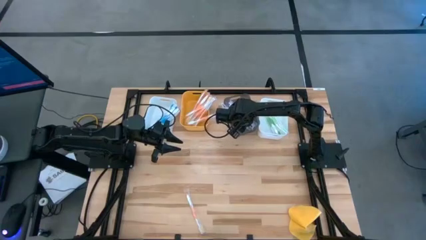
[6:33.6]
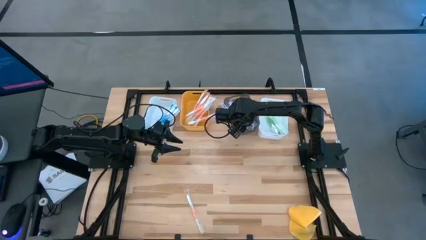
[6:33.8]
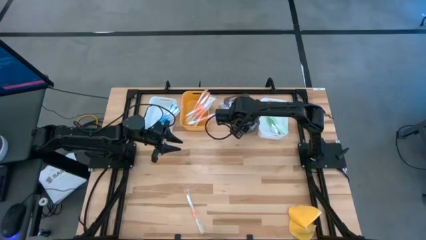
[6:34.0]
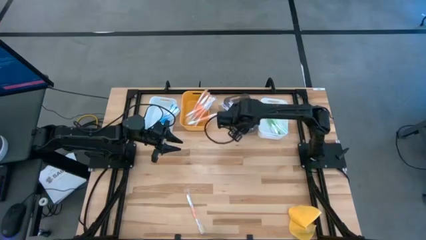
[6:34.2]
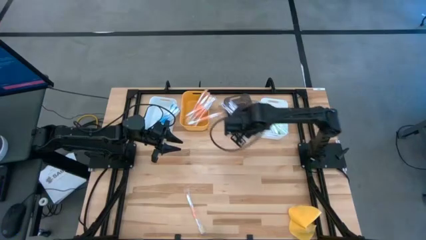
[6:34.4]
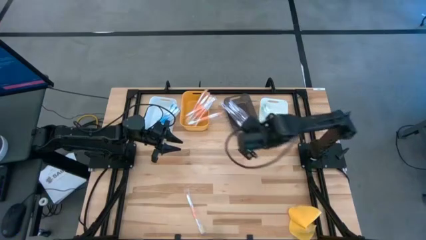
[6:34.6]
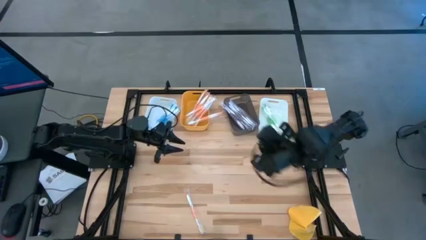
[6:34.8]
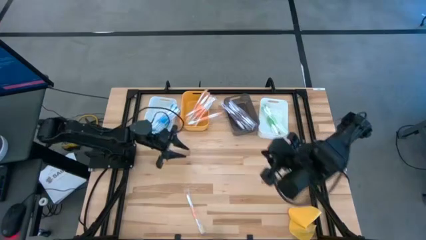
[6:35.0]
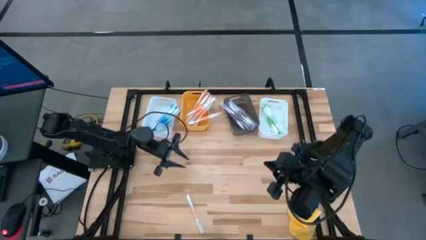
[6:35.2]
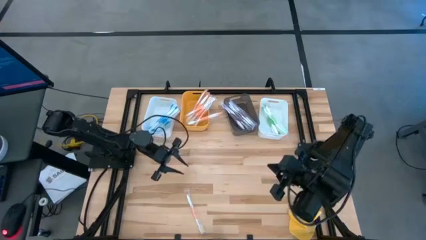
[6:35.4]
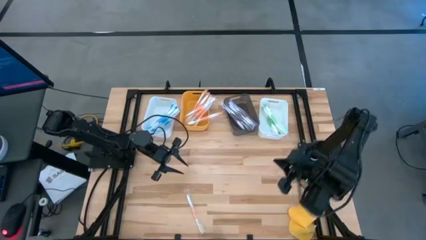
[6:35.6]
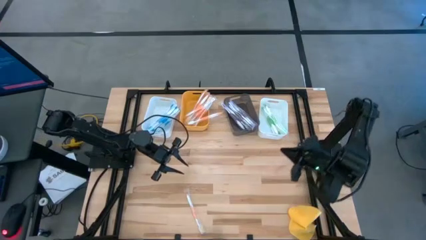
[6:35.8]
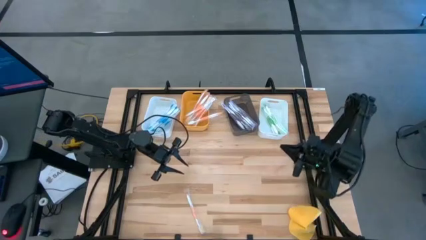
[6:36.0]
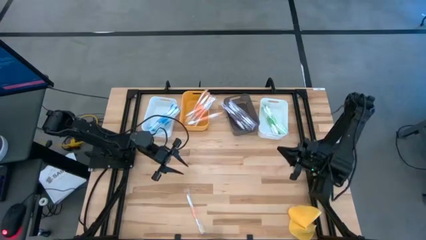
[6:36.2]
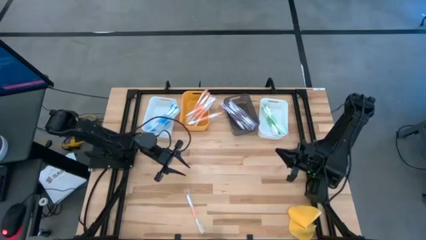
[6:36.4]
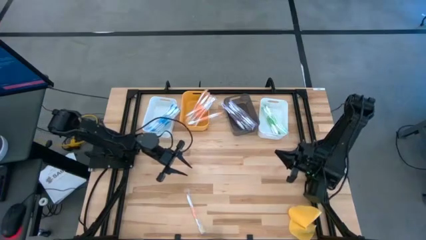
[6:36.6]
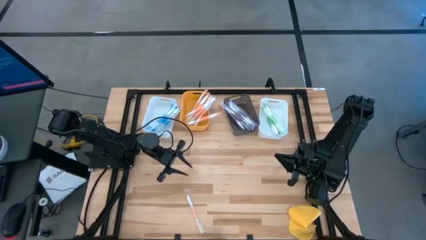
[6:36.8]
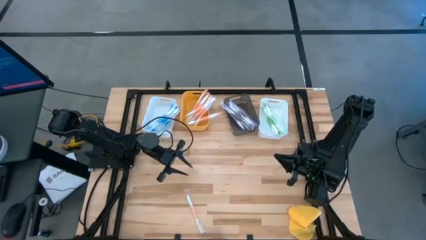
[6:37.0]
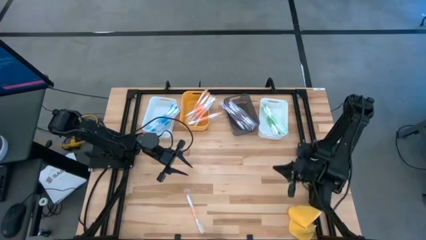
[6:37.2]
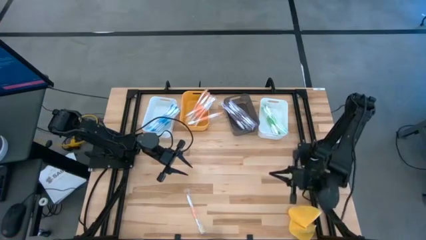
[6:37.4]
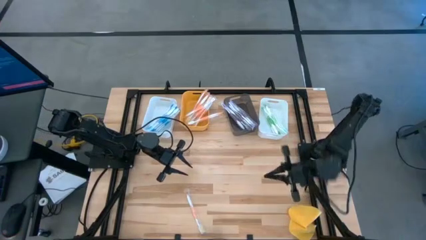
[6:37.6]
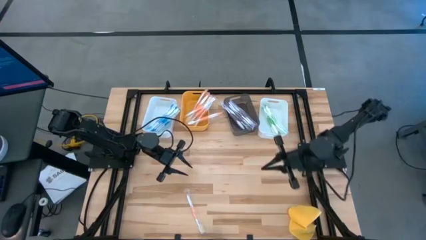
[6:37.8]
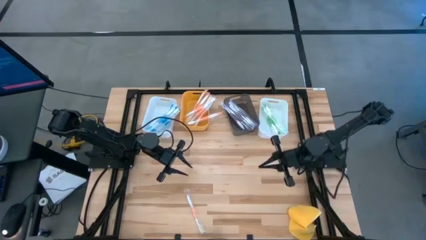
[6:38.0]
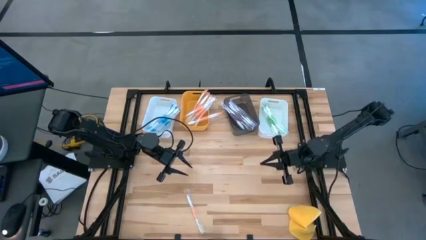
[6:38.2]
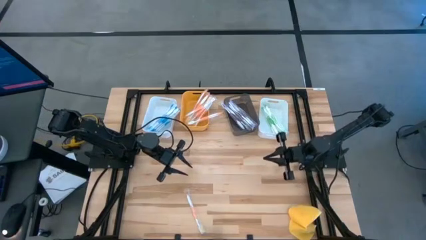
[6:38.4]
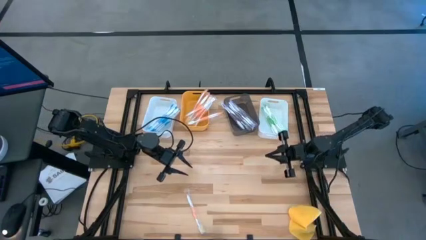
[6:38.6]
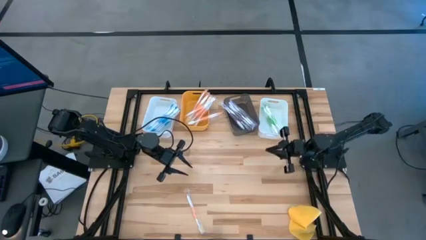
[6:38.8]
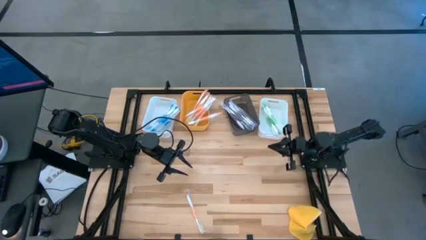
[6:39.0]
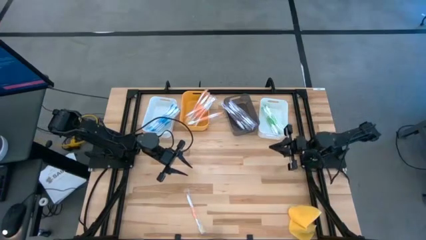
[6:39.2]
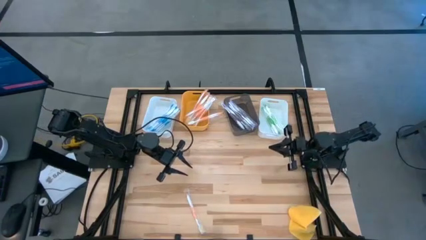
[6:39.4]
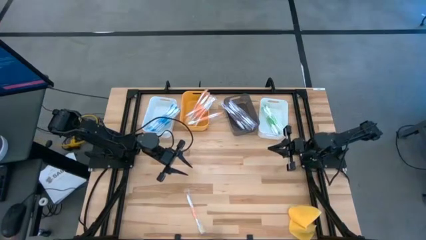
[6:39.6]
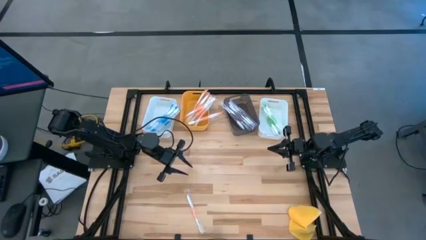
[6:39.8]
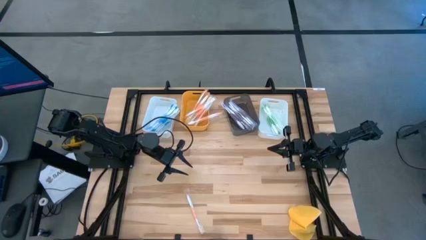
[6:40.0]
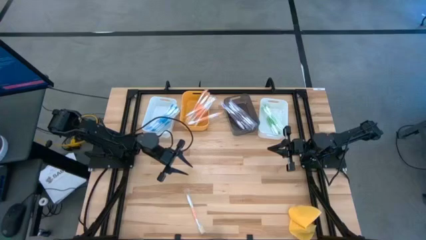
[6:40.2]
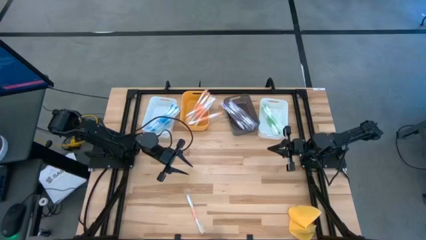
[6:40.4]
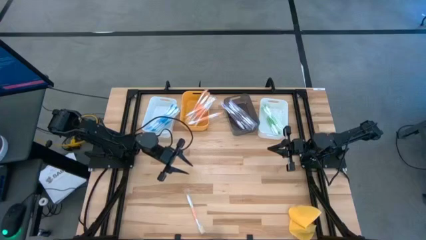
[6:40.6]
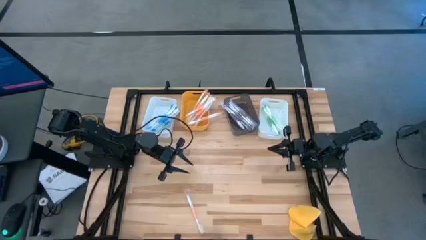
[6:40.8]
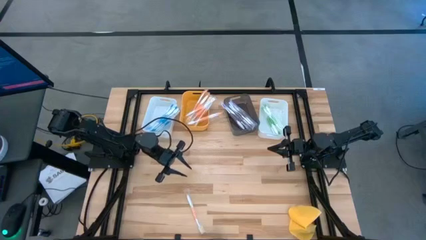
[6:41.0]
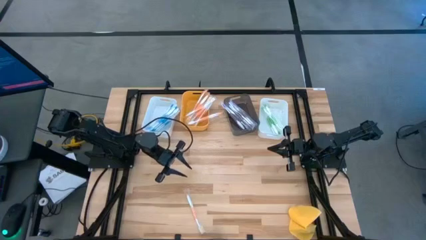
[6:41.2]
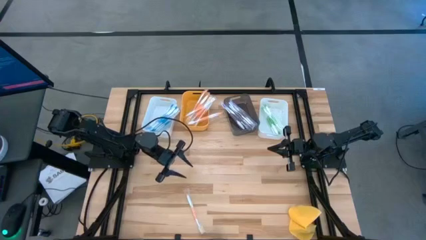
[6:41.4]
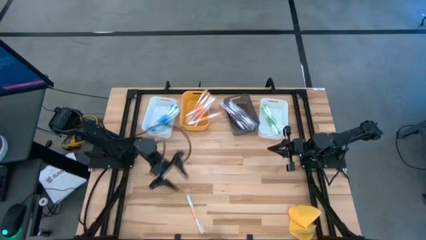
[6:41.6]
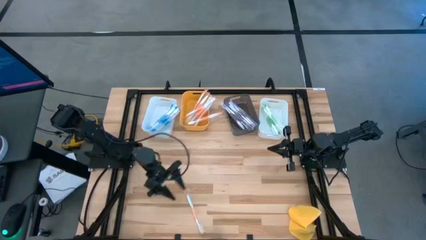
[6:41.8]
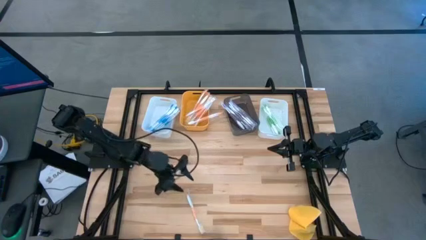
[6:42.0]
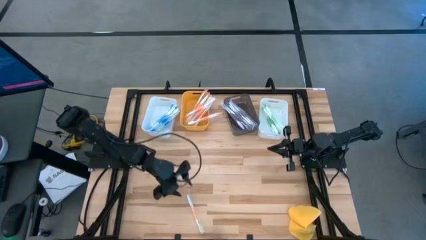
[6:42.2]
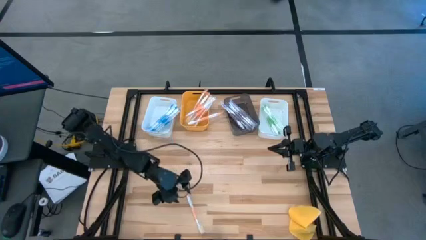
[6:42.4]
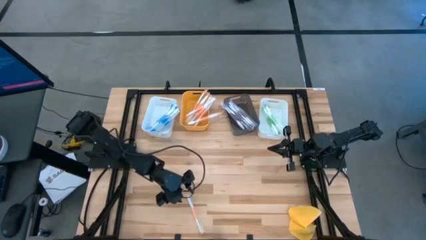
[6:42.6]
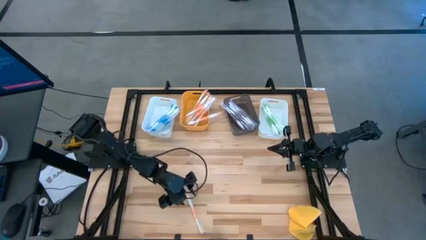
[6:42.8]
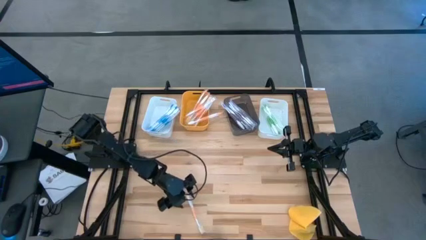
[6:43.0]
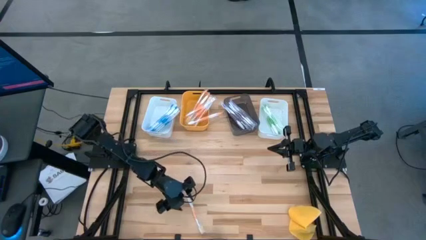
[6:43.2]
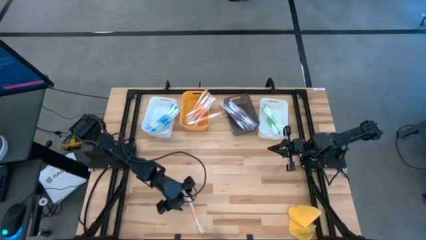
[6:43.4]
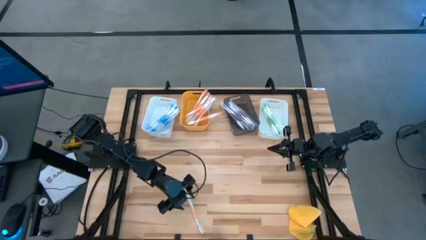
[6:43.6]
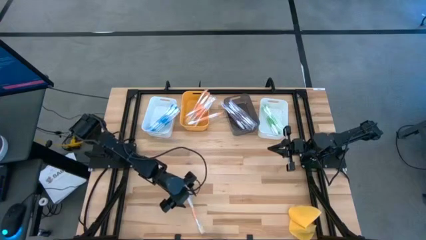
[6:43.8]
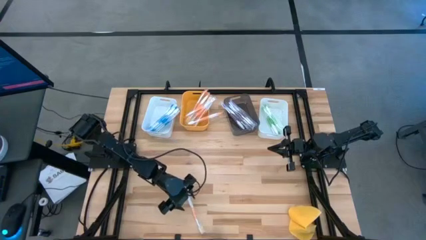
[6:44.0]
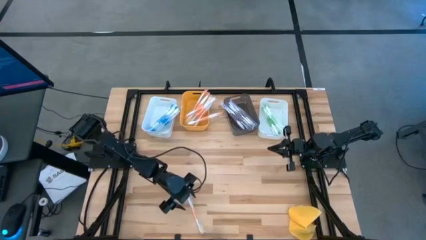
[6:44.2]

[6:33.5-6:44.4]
Task: Pick & Place Toothbrushes
Put the orange toothbrush into the yellow bin

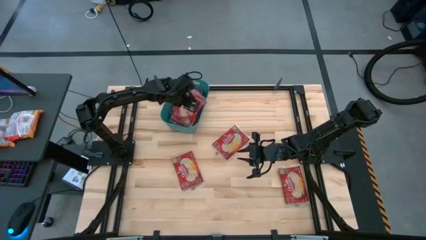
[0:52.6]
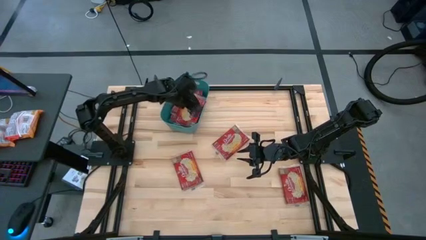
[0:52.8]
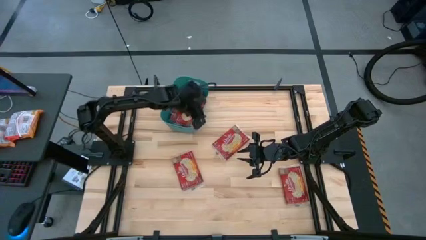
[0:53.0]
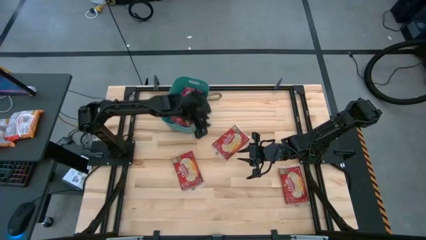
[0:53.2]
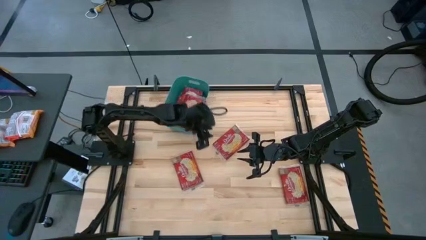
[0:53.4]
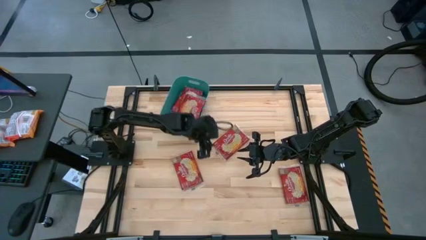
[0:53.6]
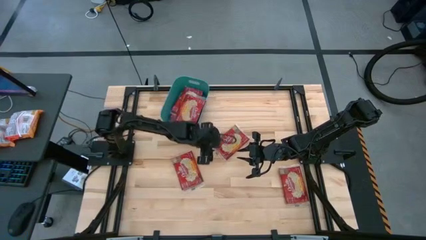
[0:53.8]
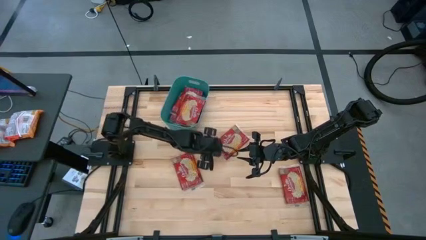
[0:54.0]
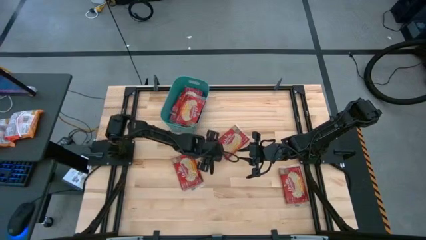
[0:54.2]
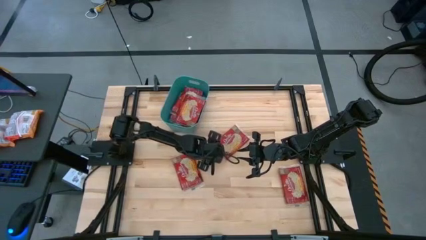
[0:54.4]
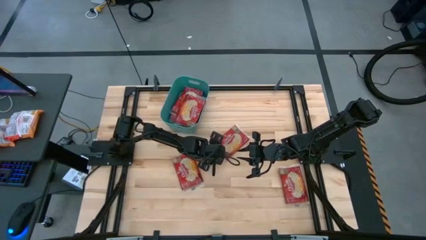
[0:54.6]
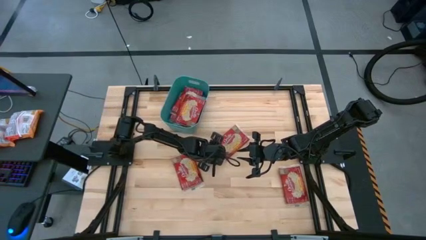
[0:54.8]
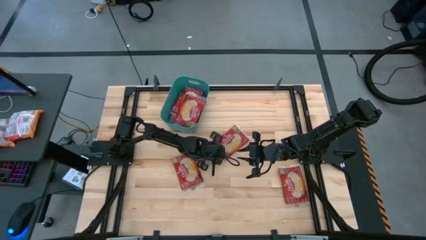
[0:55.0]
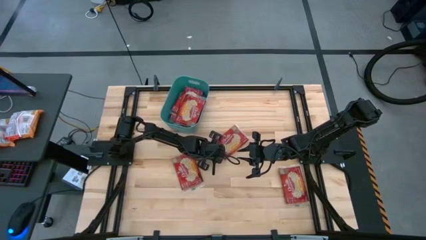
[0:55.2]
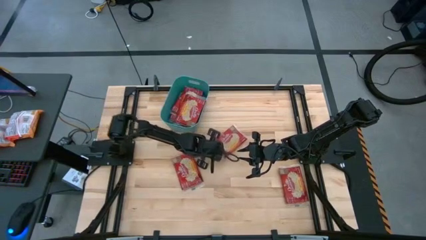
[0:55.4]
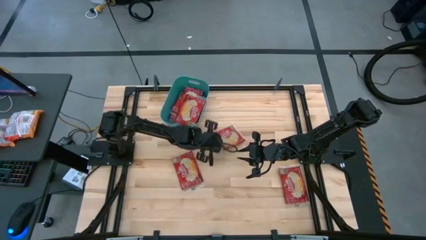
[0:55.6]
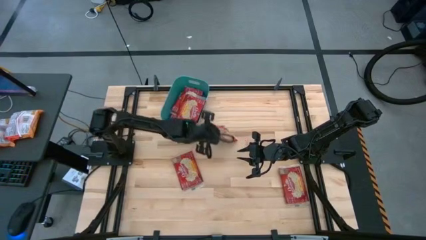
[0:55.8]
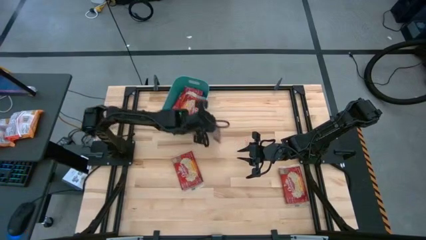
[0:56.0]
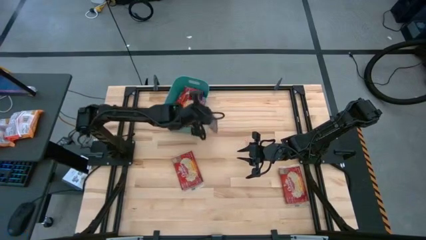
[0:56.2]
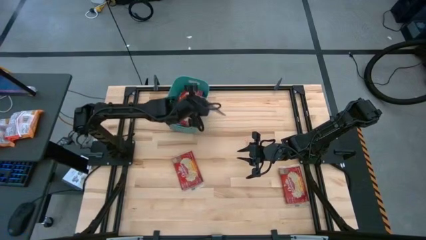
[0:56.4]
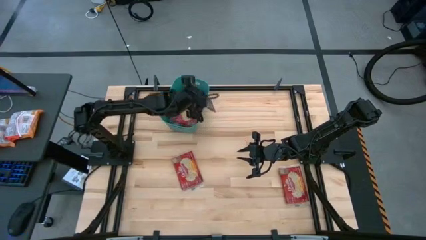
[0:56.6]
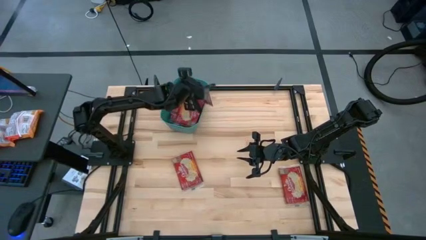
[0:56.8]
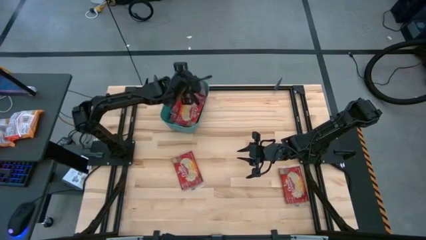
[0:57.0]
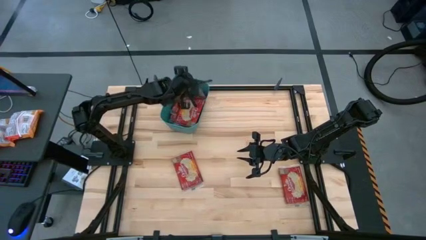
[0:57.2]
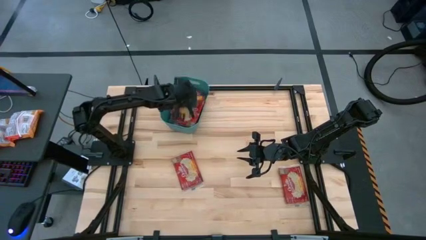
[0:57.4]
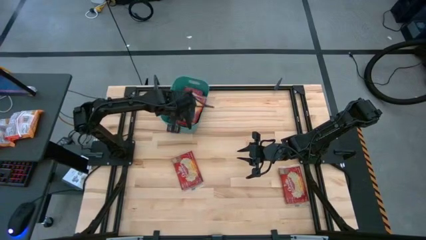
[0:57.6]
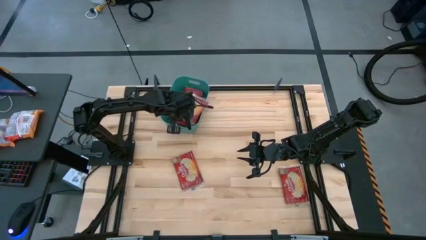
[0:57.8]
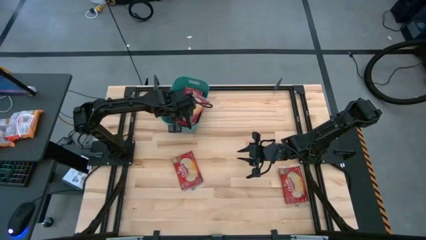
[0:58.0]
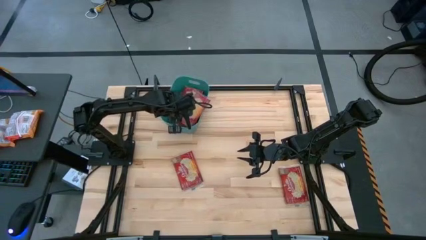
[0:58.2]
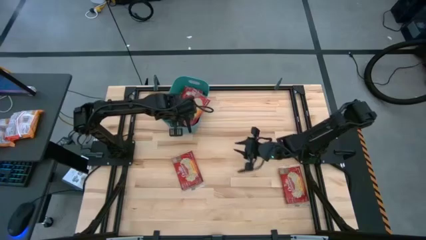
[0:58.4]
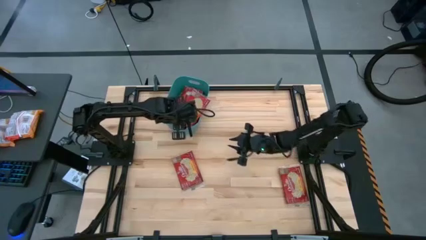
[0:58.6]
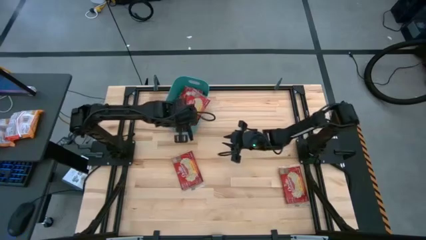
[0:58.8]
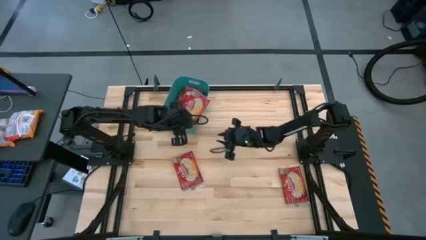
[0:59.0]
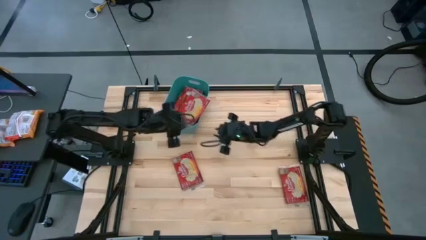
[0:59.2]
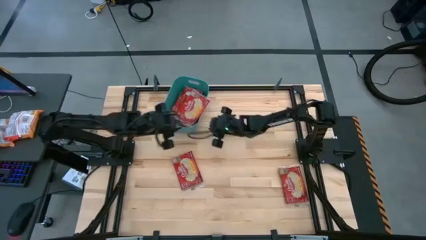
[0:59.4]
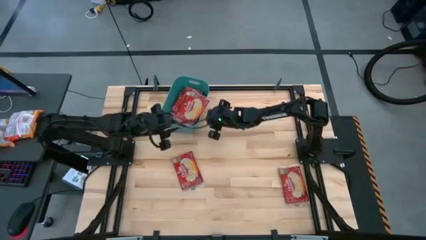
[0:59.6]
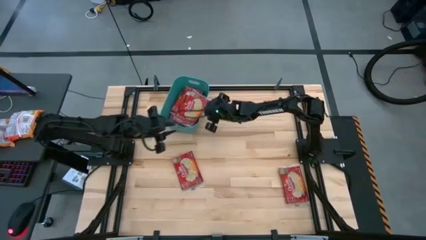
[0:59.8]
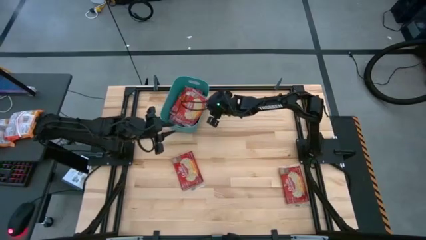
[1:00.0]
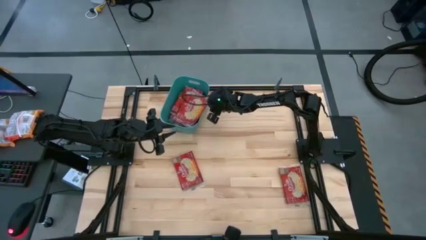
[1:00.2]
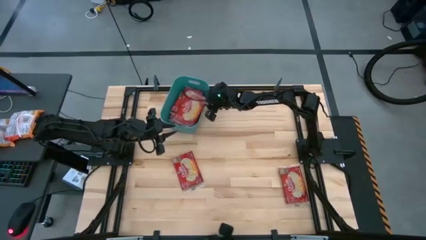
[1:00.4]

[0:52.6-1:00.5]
Task: Sort popcorn bags into baskets
Put the red popcorn bag into the green bin
